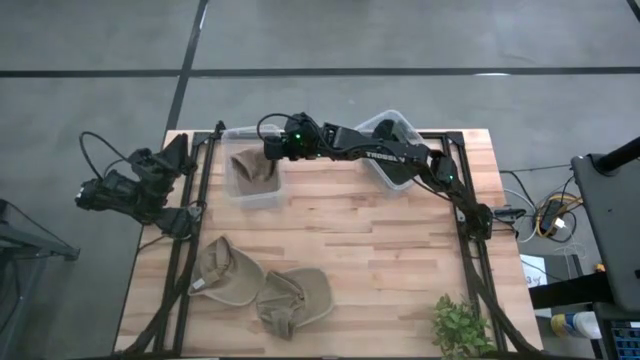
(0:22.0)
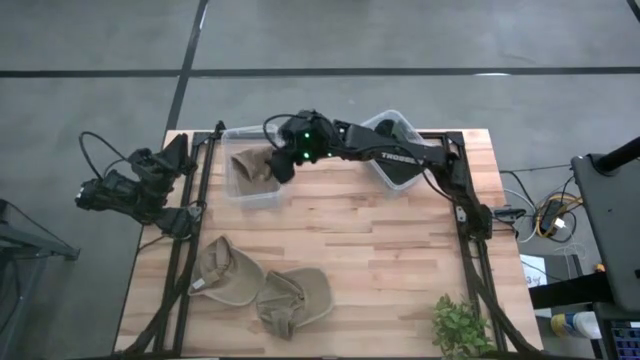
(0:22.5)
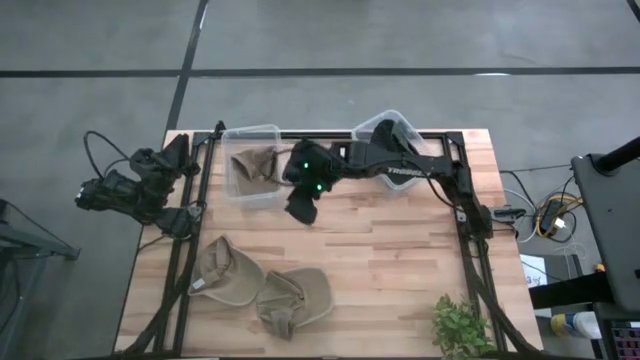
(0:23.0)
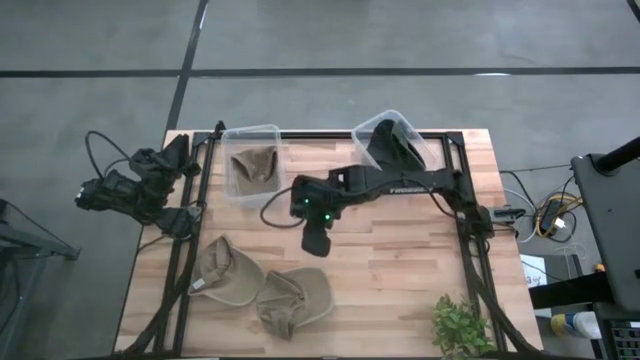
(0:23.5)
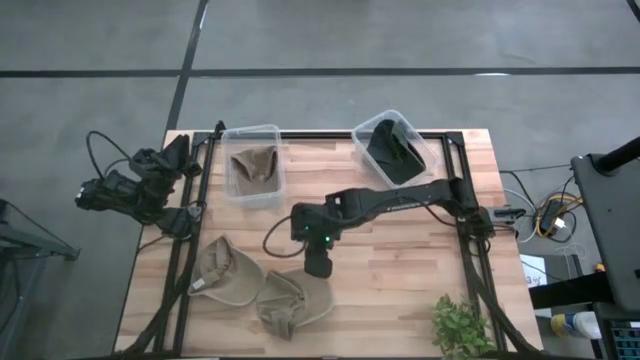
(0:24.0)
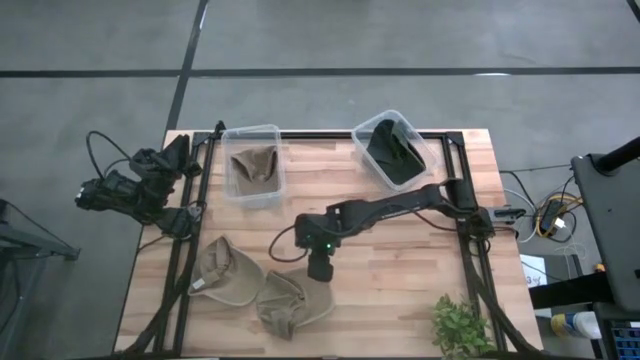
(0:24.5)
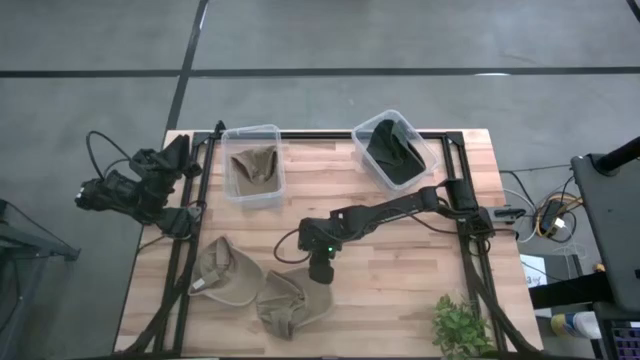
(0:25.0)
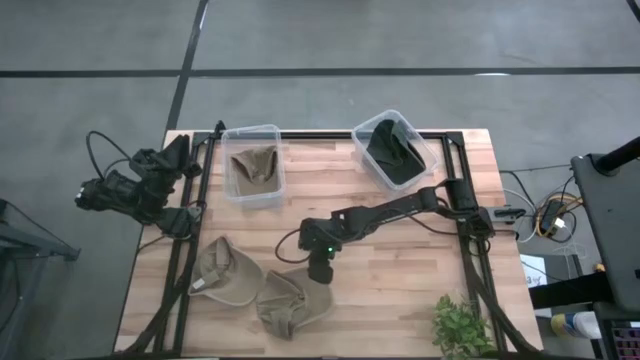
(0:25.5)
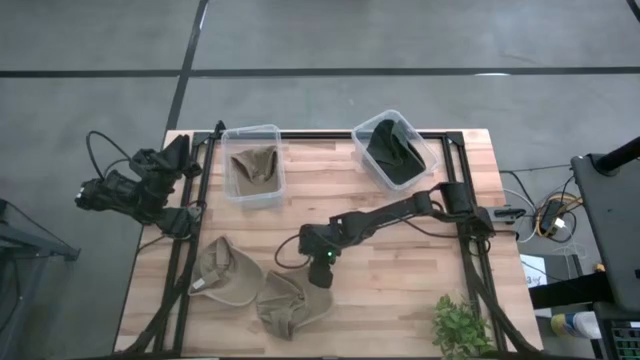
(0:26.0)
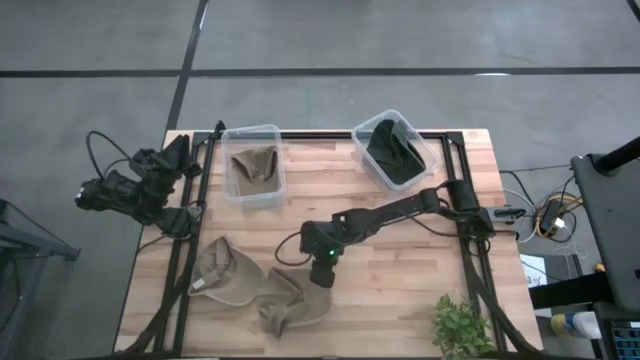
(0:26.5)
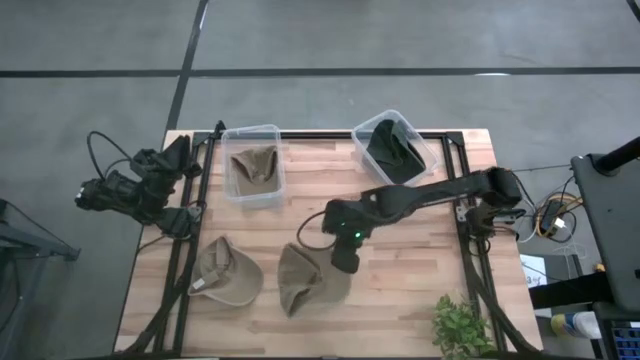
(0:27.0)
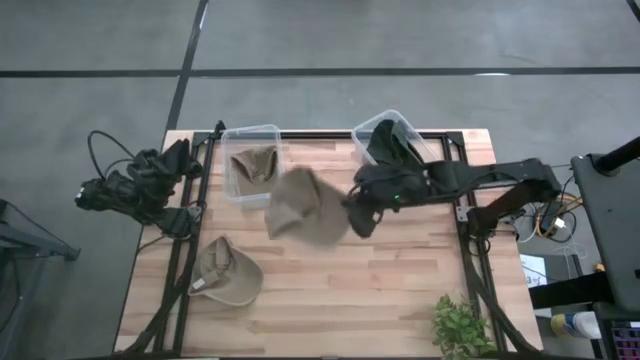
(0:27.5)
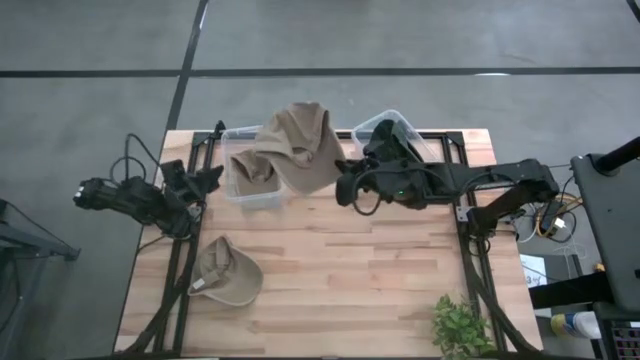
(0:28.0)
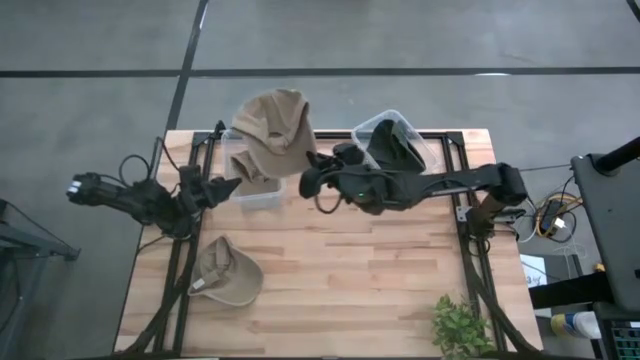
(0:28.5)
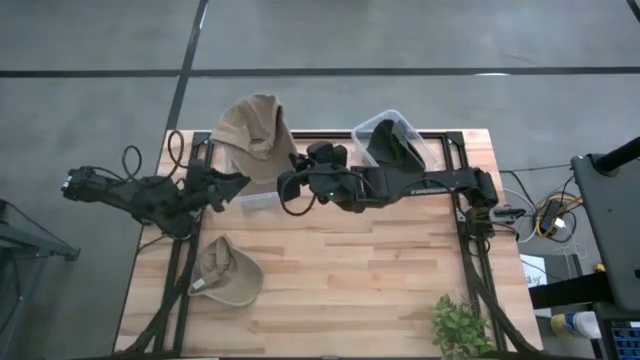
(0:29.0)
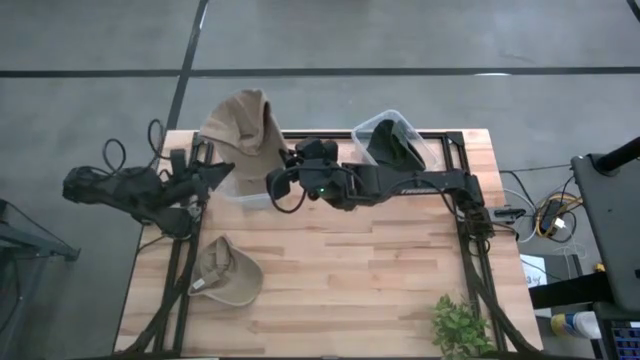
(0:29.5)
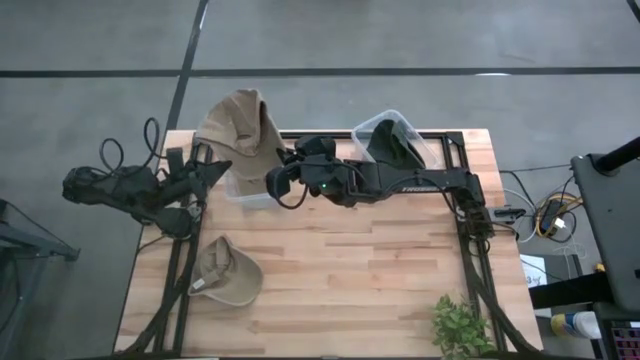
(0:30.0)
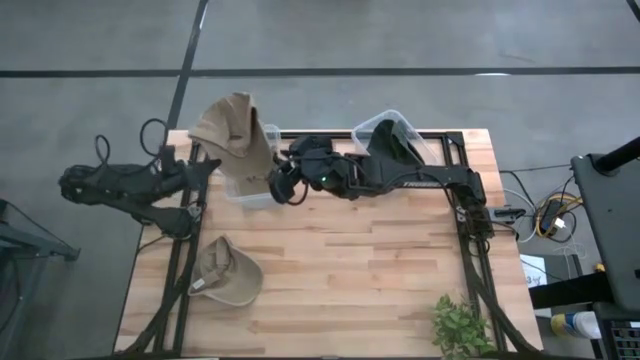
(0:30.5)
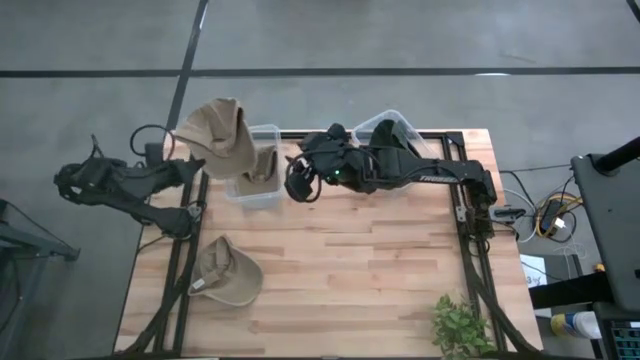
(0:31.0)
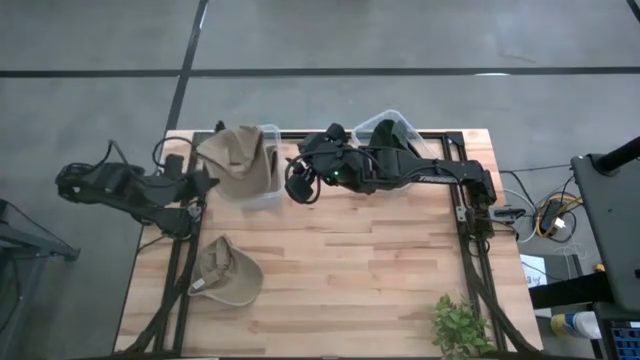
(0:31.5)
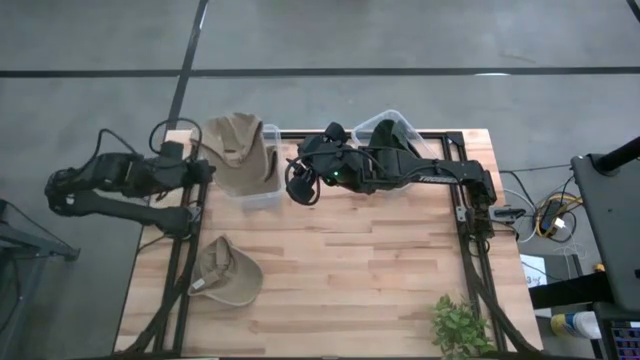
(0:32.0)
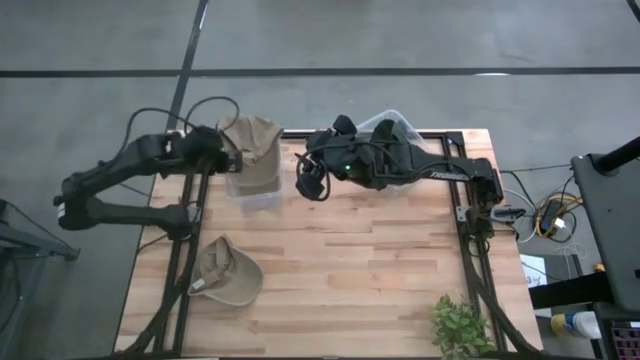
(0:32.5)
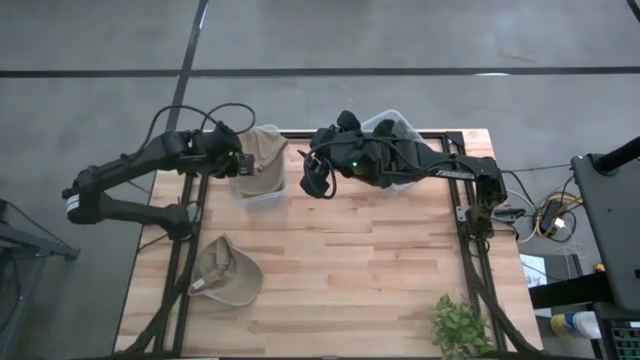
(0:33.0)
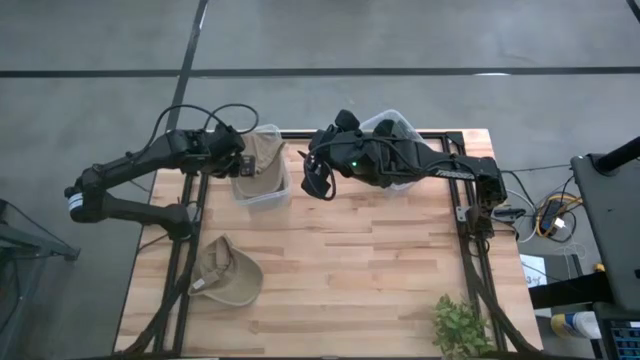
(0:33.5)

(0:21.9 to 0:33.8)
Task: Pick & Place hat
Put the right brown cap into the left transparent bin

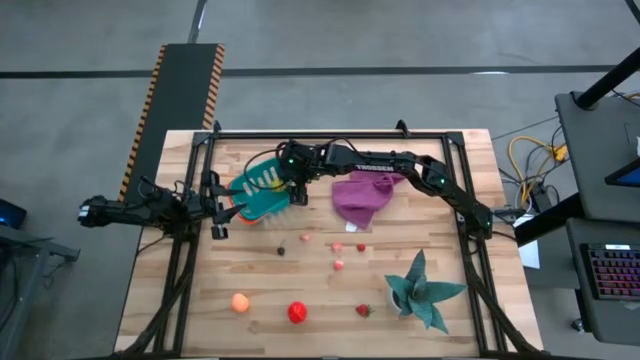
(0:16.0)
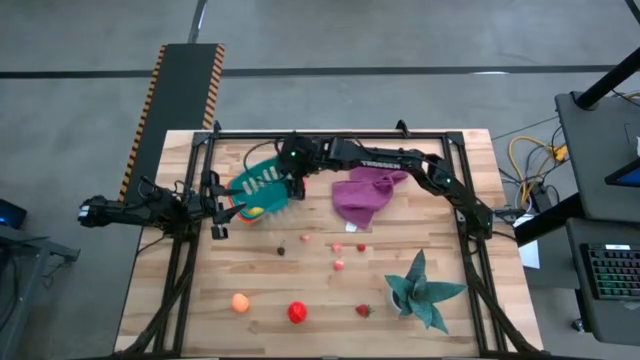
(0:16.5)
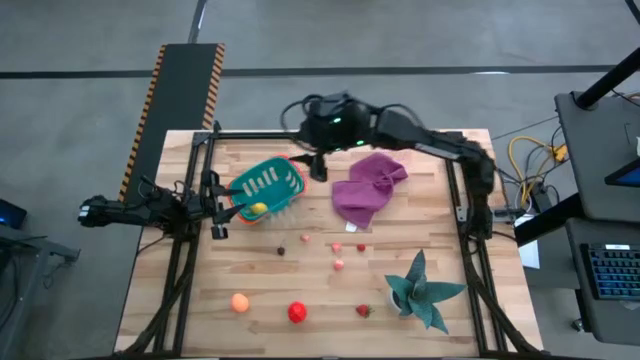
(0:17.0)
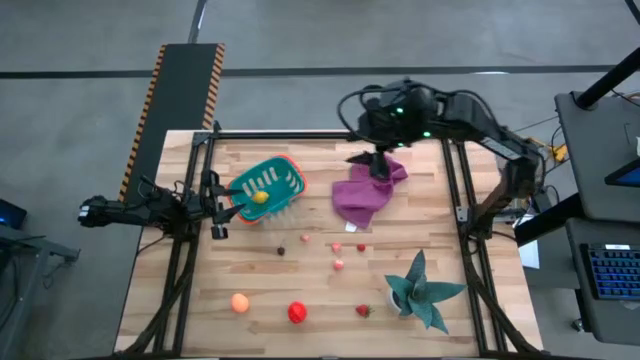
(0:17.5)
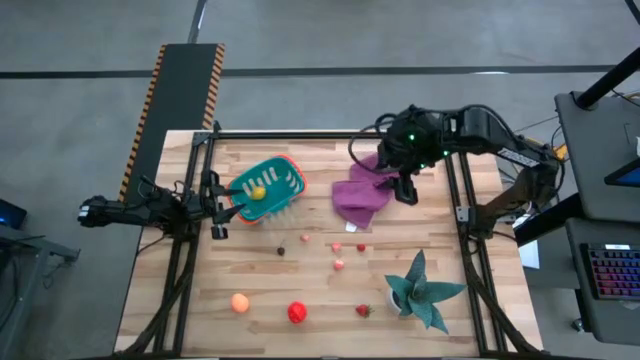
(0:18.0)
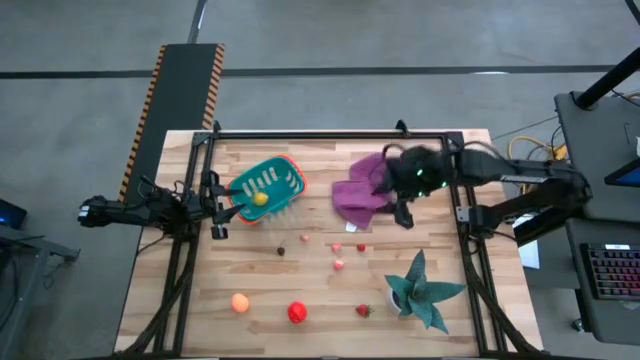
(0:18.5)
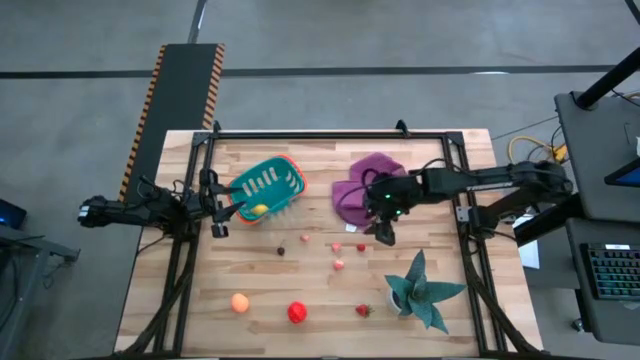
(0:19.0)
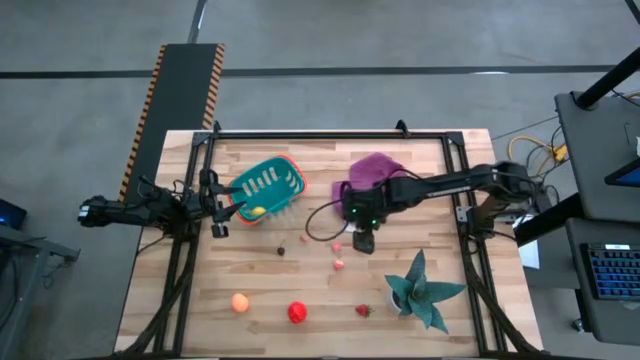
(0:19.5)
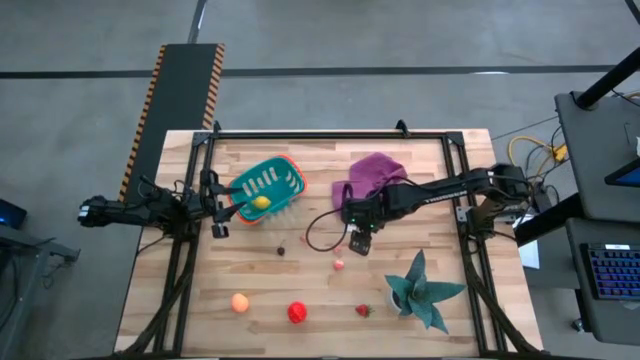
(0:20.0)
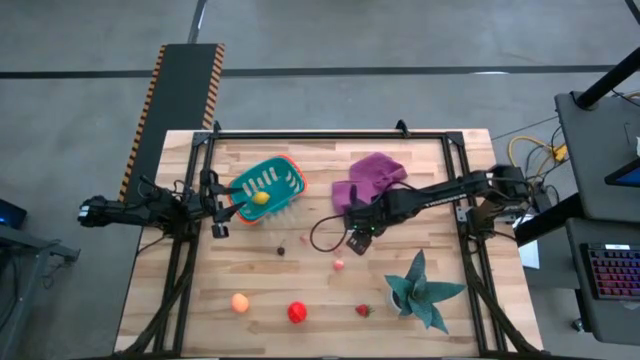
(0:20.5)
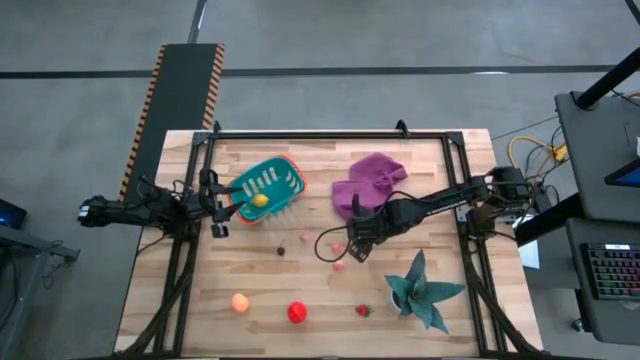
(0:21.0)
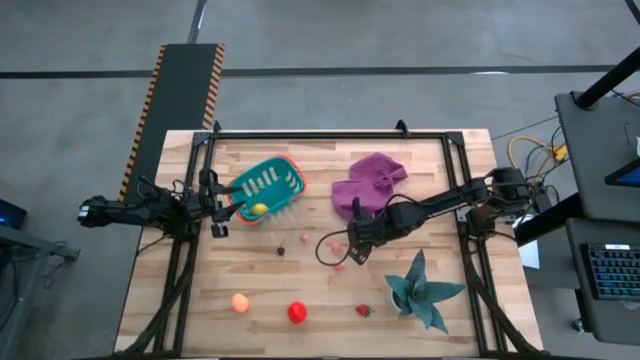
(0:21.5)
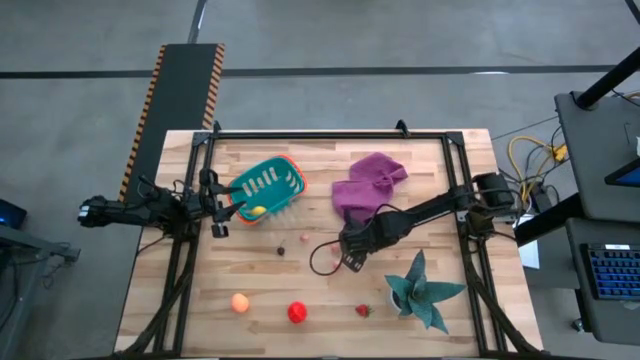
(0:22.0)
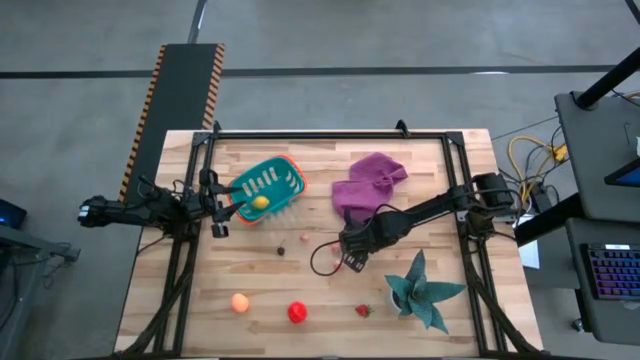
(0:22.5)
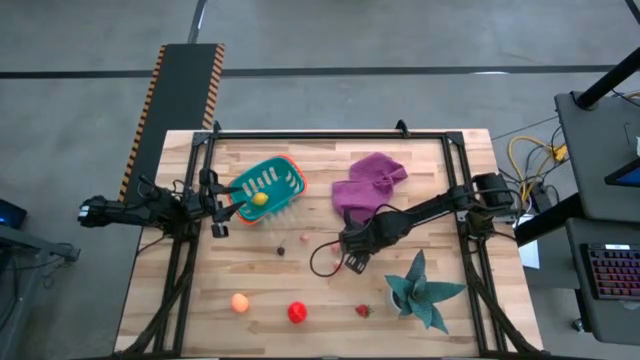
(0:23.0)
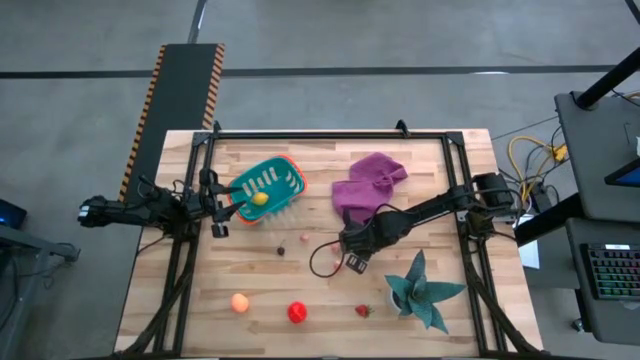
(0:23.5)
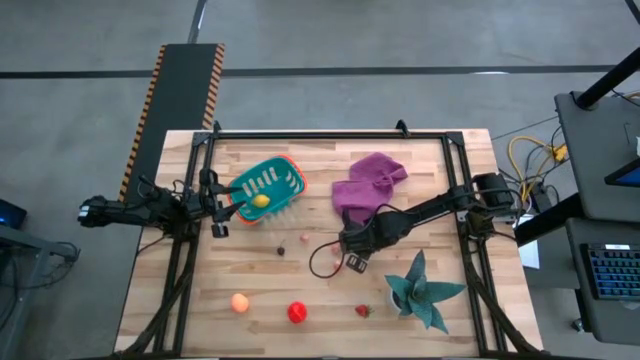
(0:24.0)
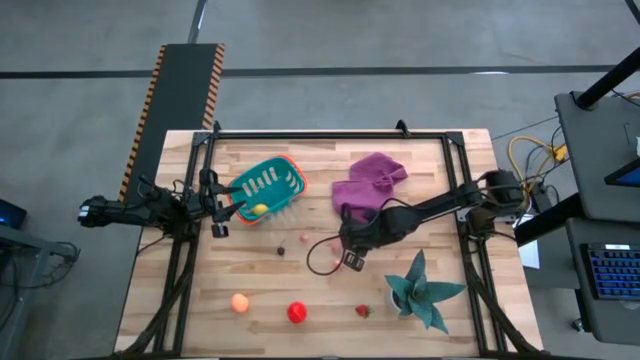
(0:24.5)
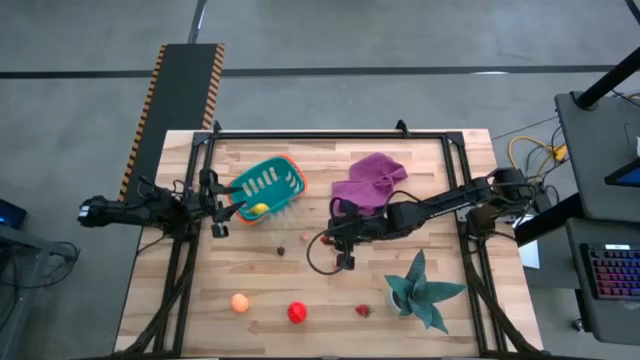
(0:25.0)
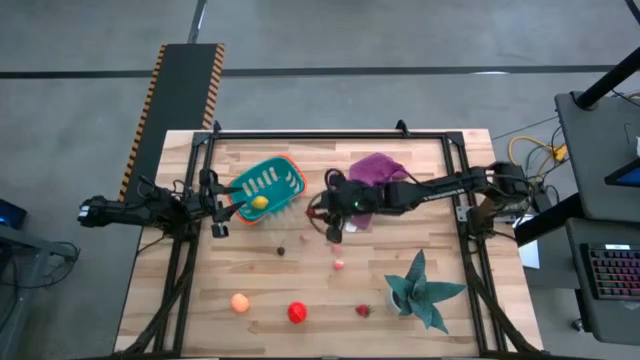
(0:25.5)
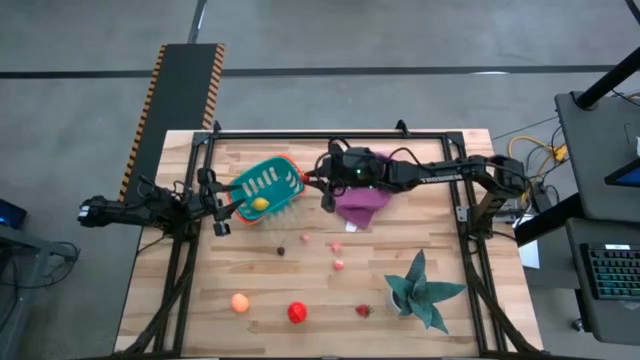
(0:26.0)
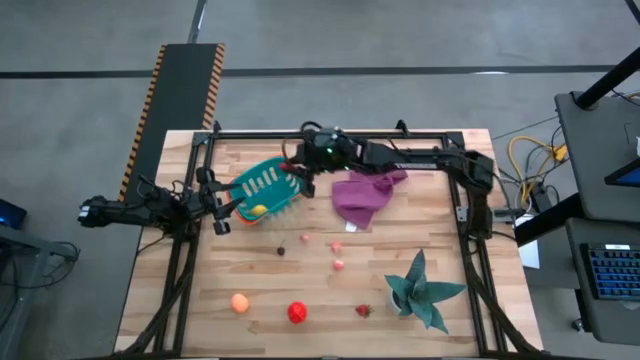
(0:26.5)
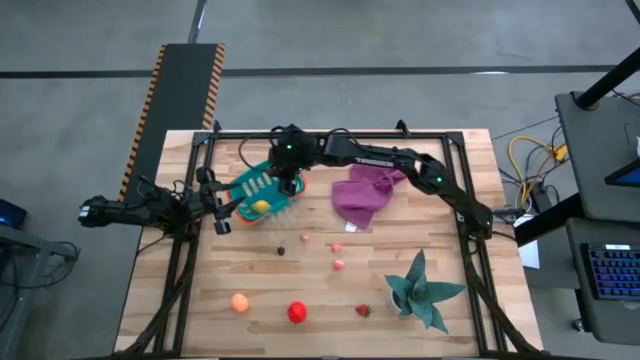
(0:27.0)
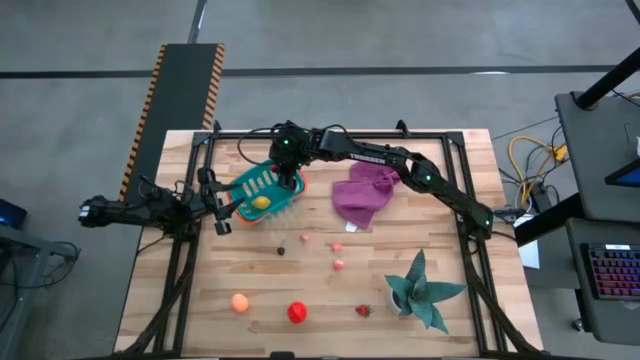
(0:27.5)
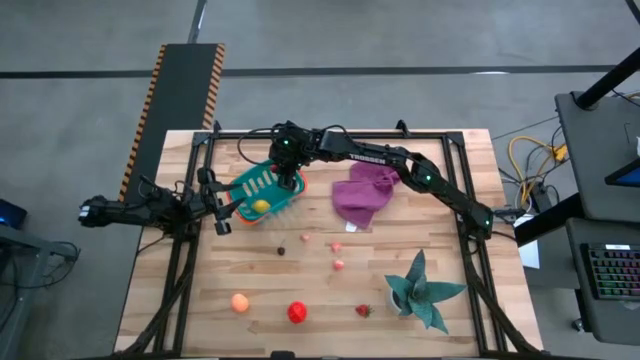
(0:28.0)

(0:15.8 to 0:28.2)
Task: Pick and placing Produce into tupperware
Put the red raspberry into the blue basket
